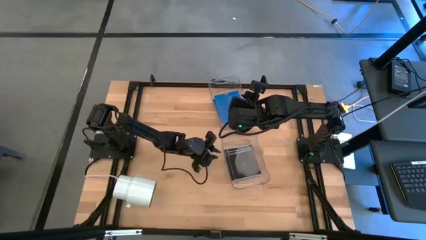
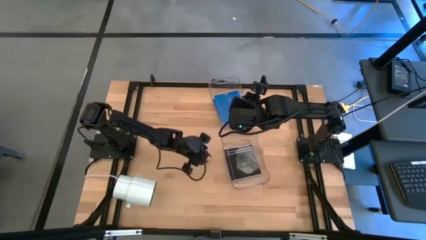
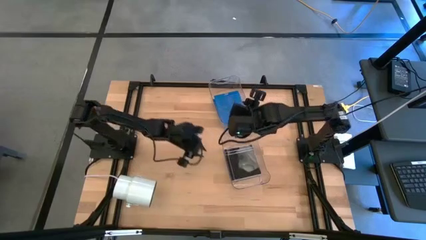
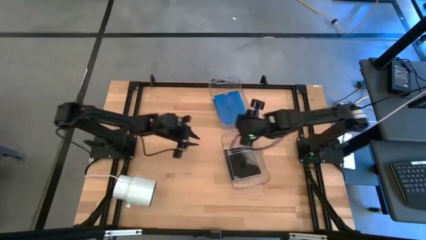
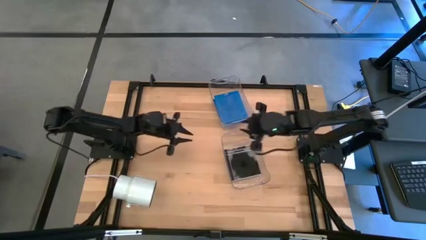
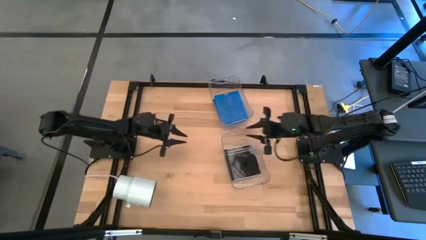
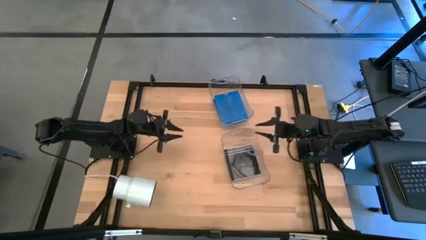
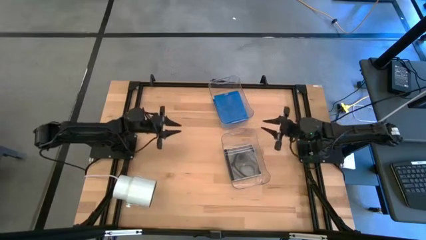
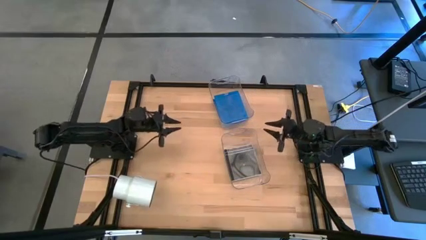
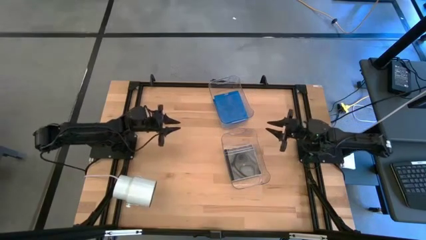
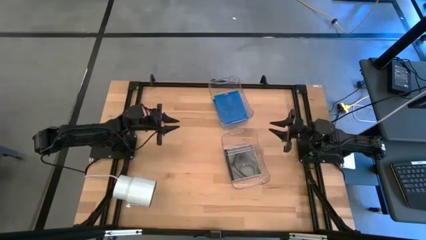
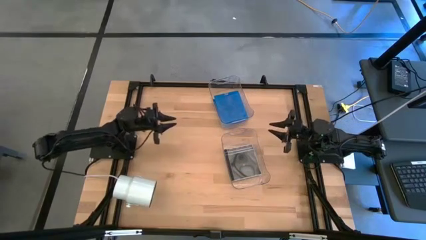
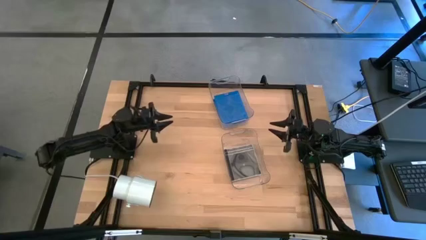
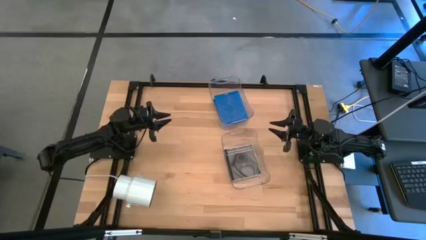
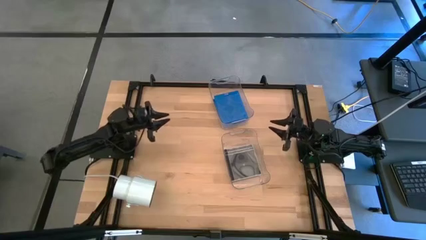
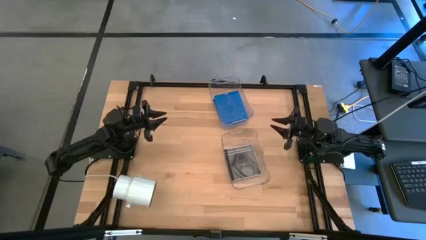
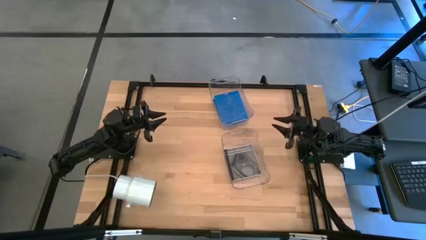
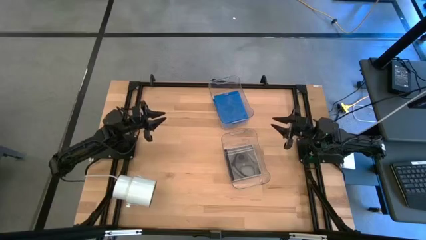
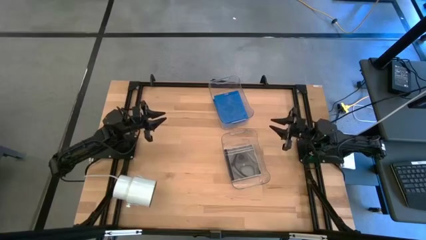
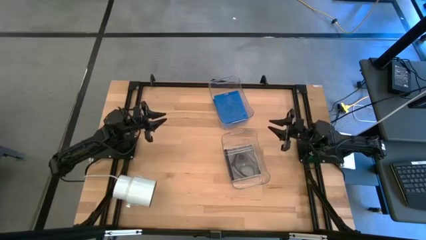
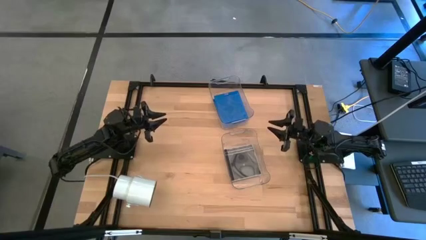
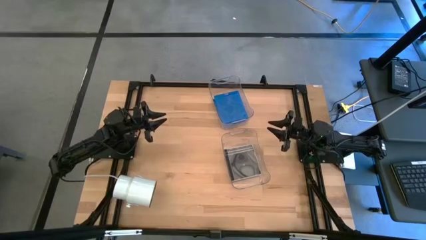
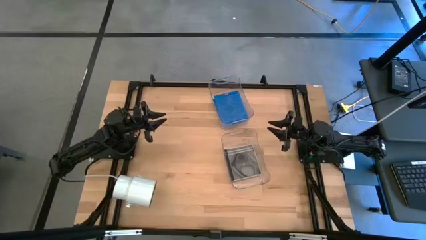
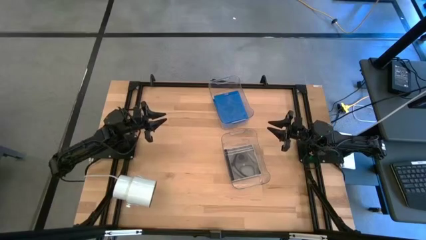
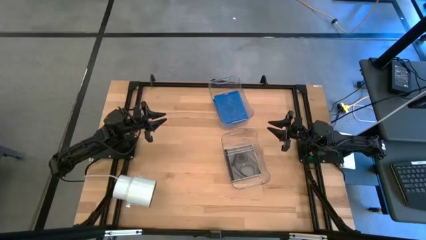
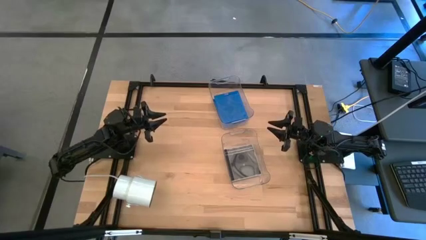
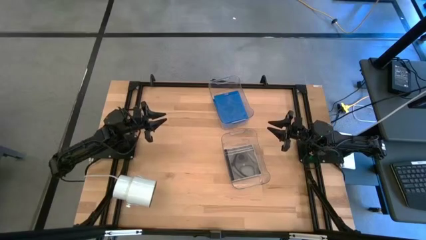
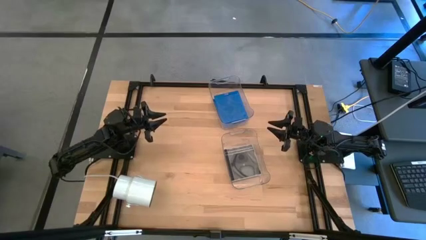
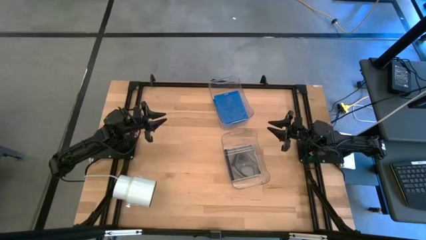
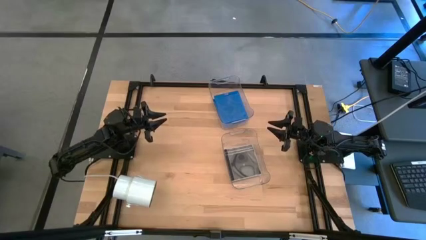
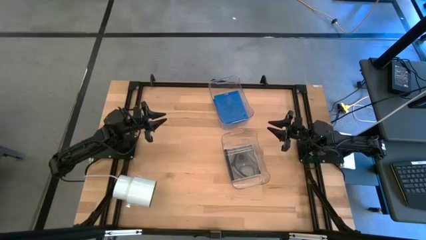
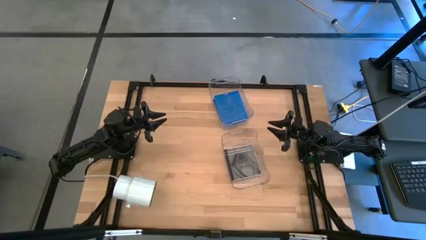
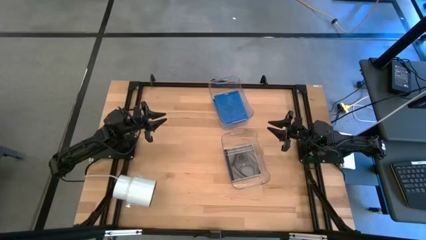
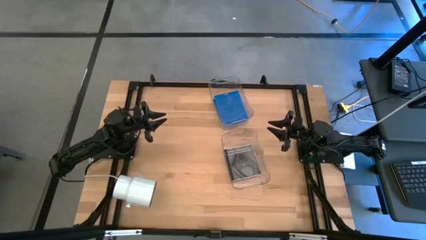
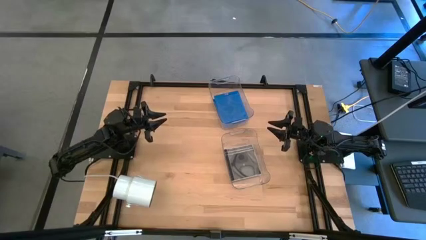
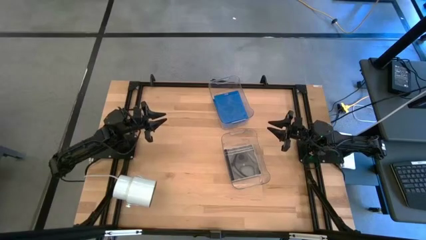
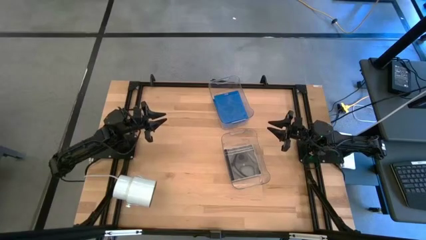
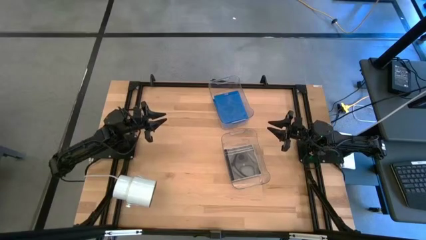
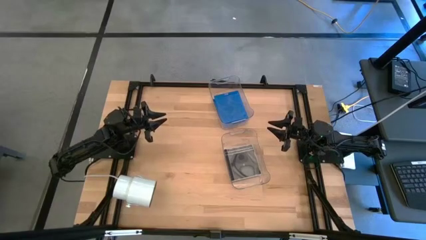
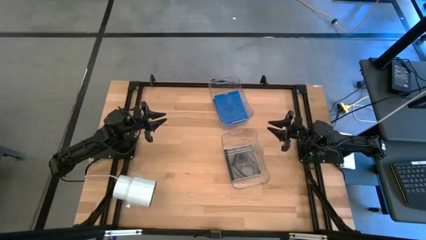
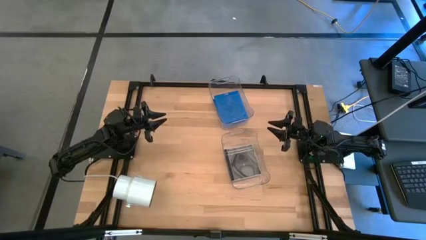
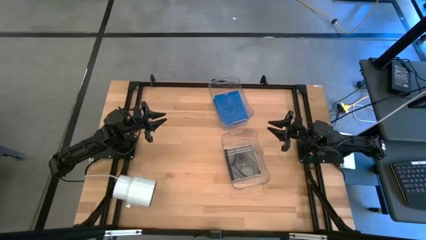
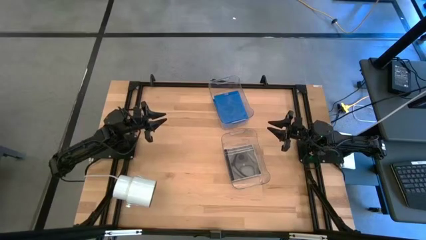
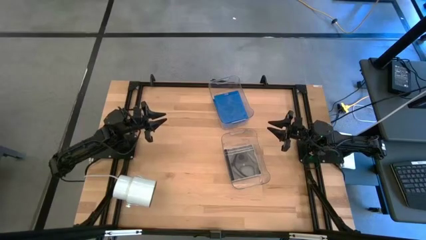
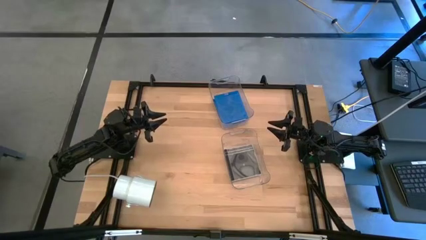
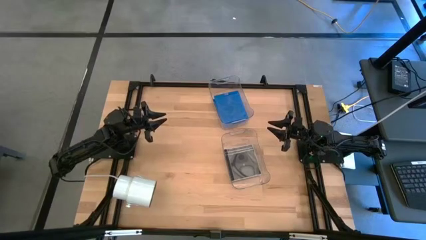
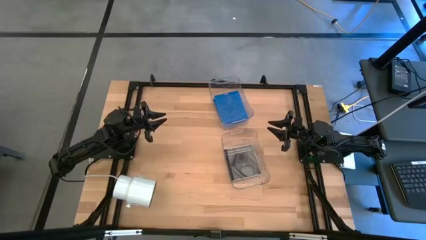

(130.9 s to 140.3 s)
Task: Pick & place jewel cases by type
Return to Home Position

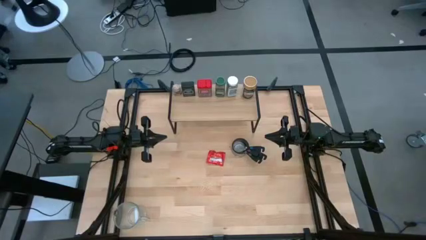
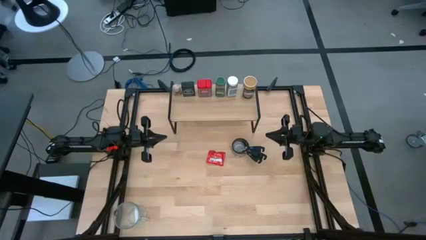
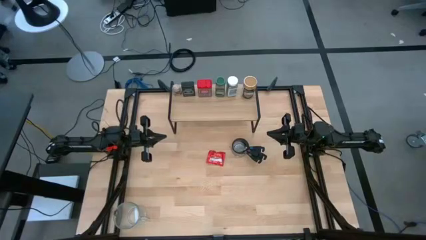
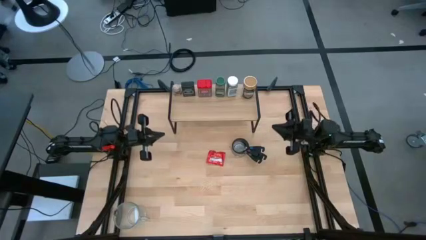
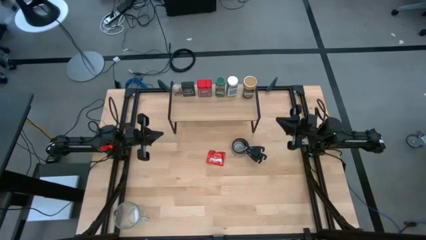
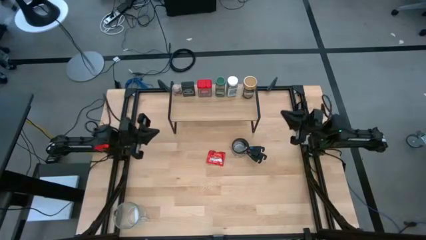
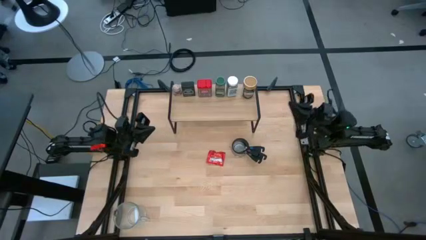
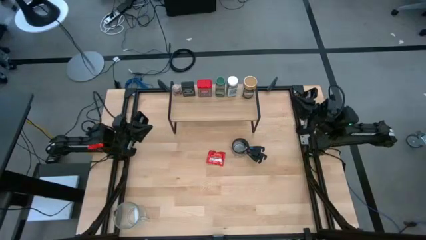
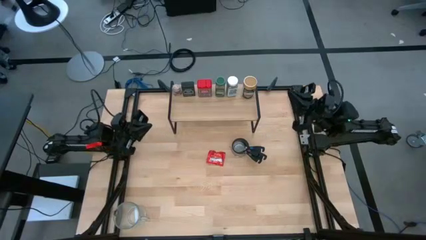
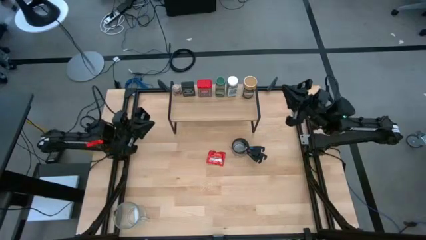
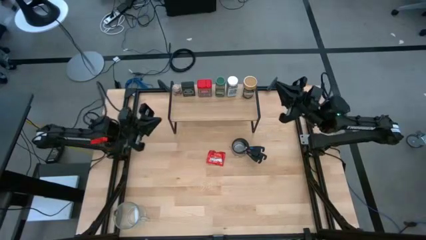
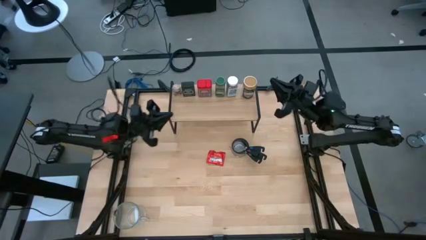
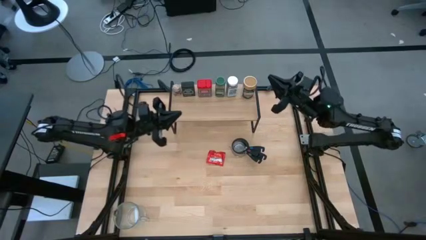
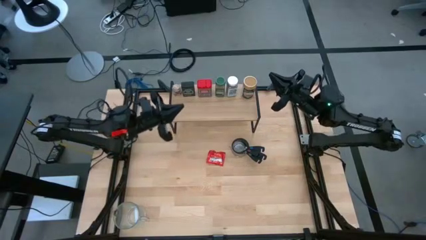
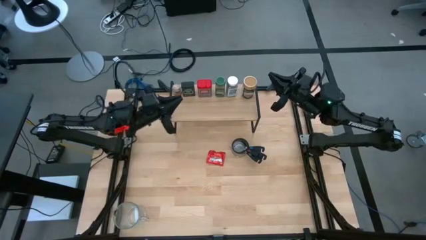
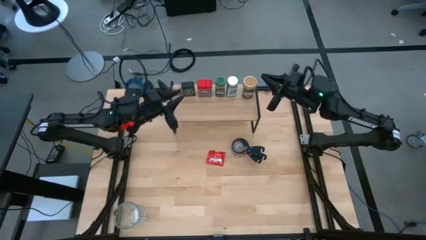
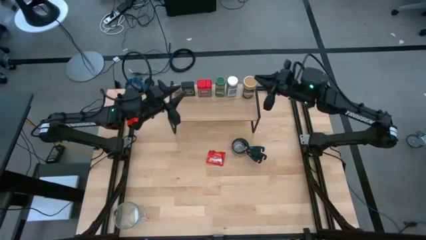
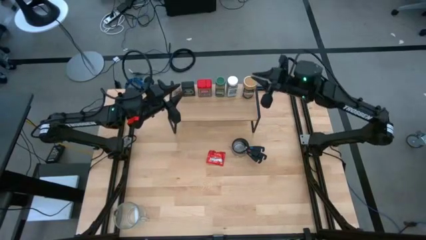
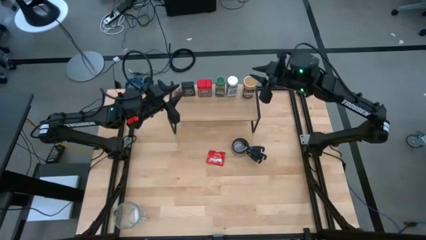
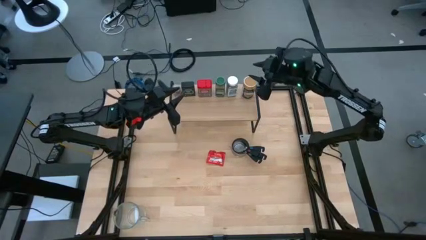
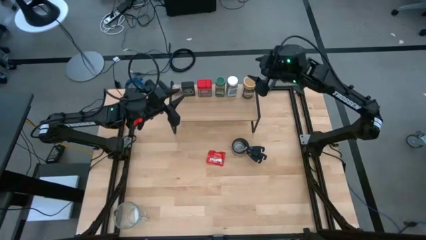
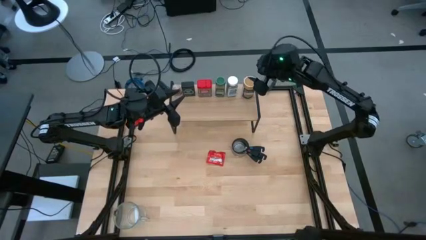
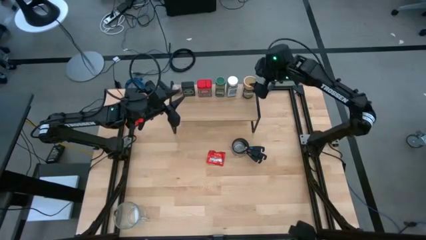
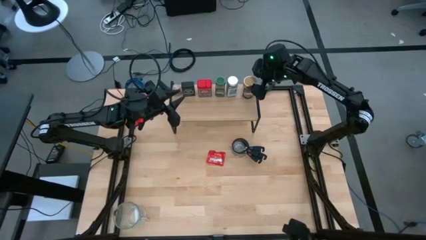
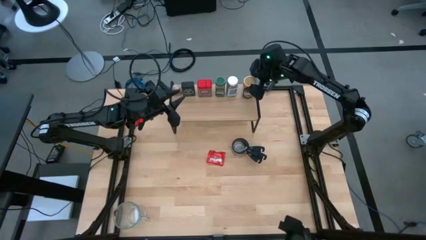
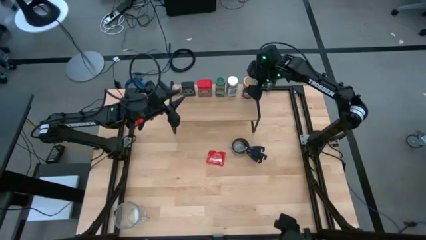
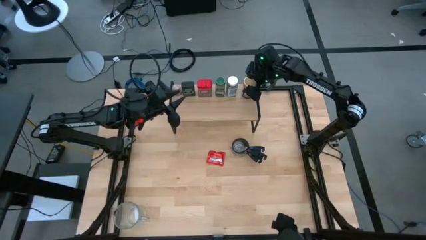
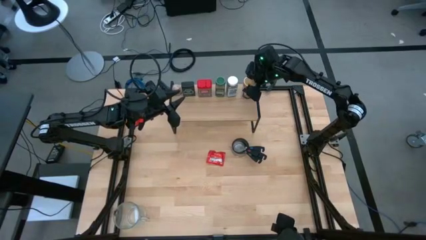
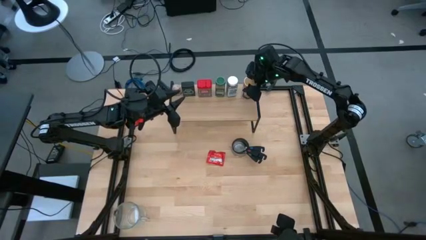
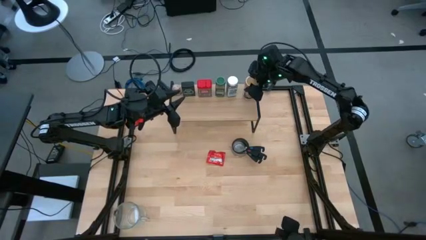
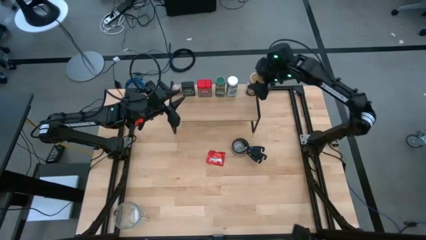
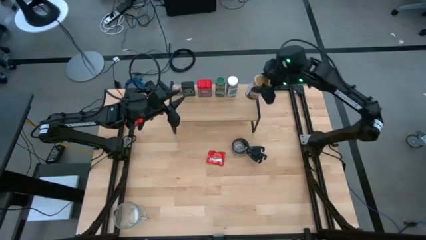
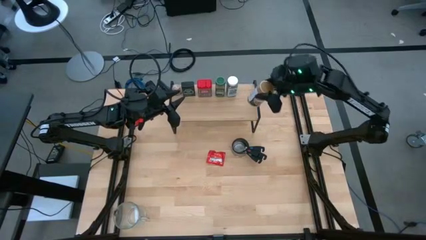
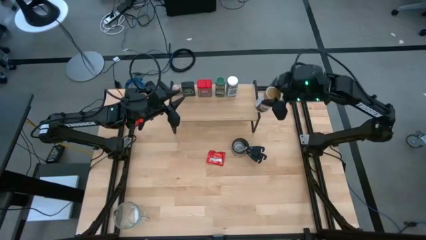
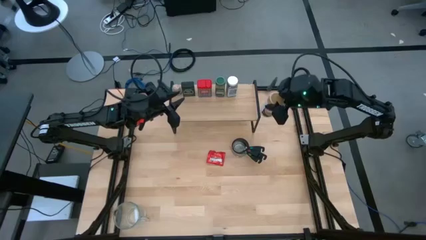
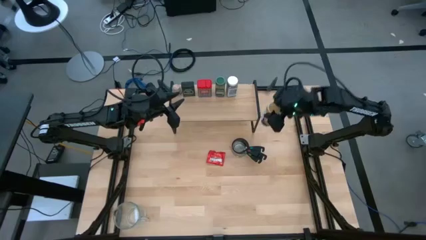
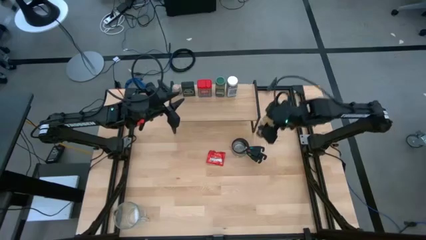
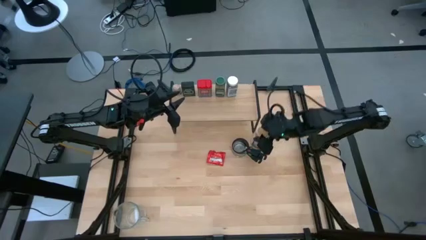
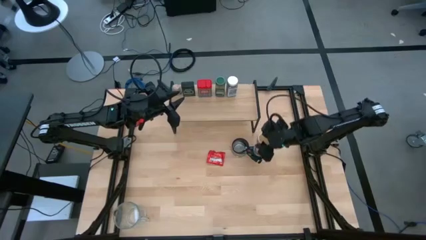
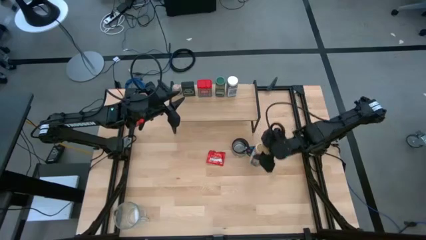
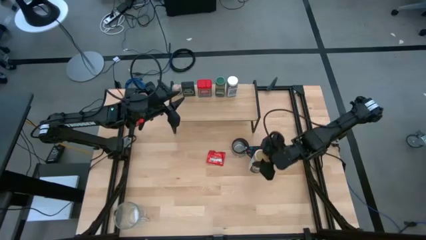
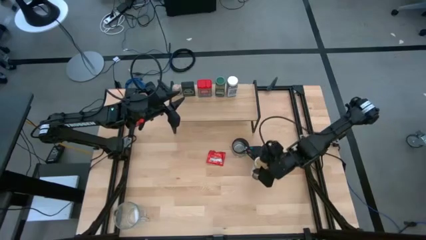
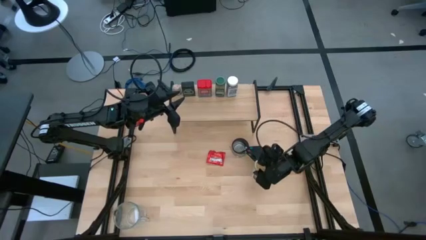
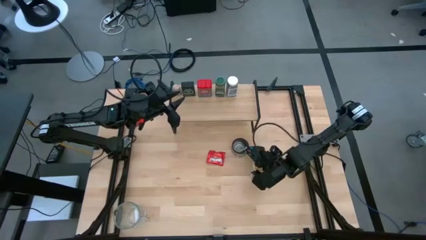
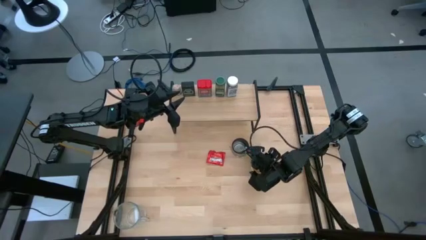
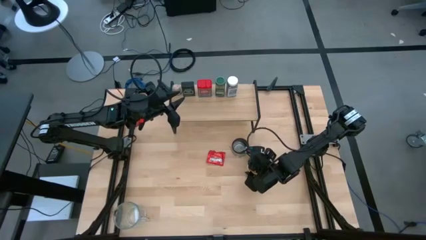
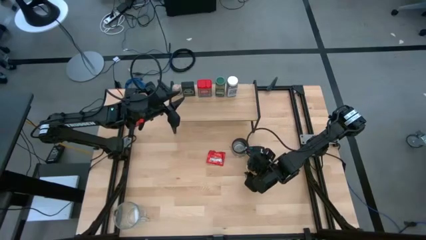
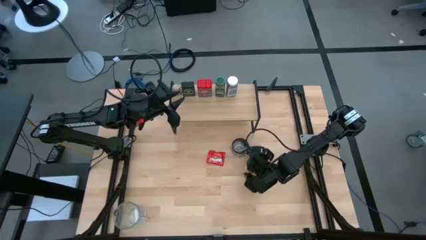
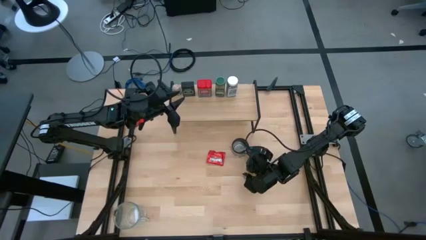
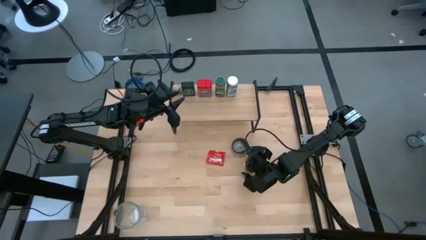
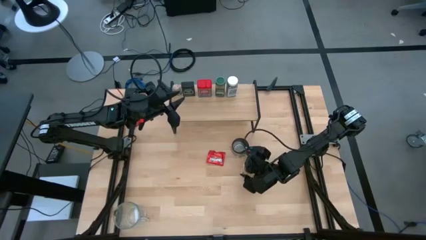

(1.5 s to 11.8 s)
Task: Shelf spices
Remove the gold seasoning bottle from the shelf
